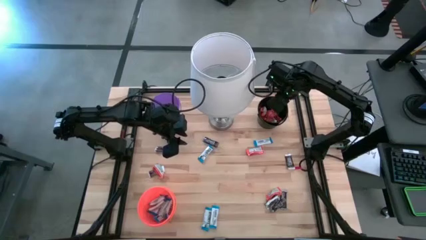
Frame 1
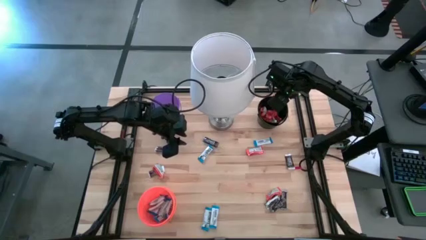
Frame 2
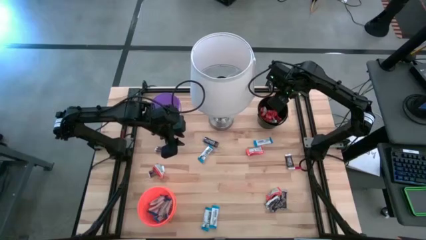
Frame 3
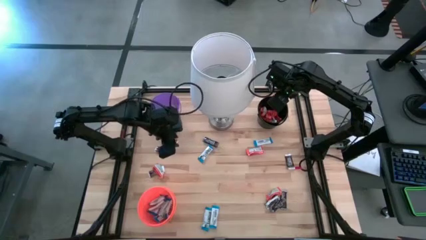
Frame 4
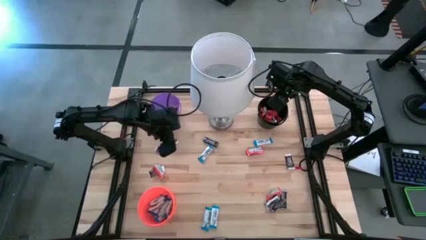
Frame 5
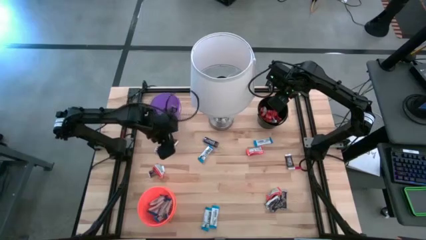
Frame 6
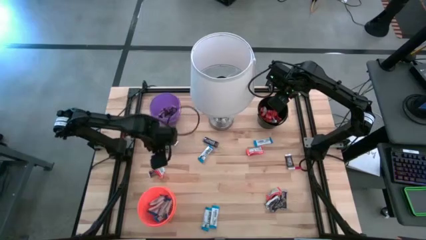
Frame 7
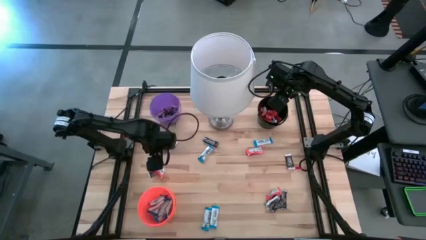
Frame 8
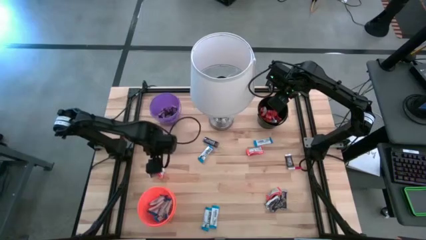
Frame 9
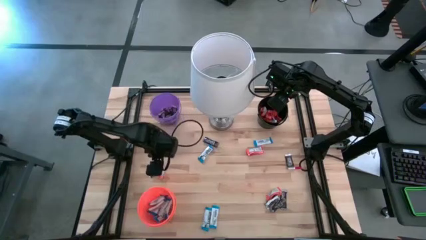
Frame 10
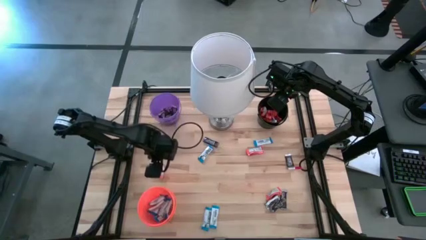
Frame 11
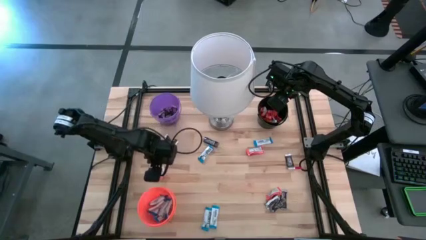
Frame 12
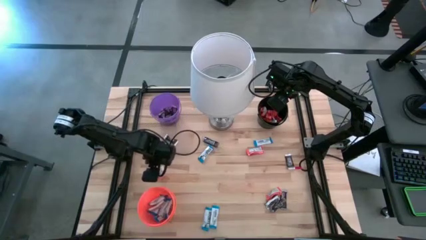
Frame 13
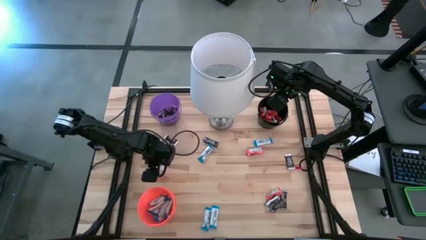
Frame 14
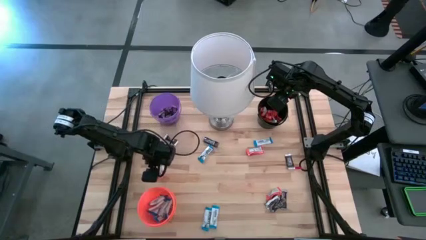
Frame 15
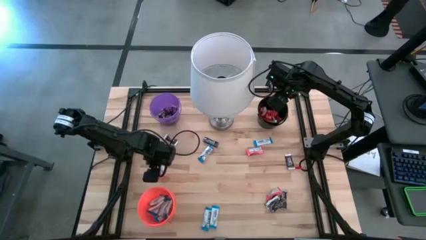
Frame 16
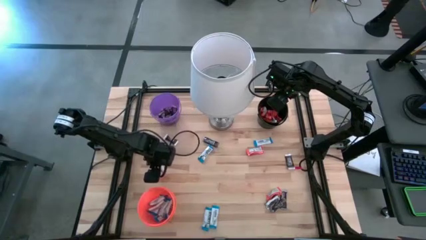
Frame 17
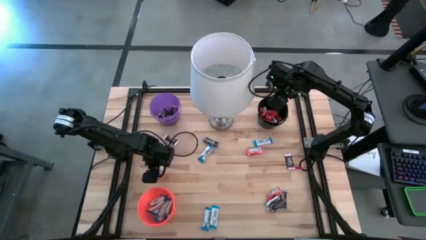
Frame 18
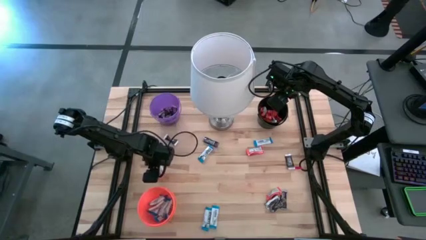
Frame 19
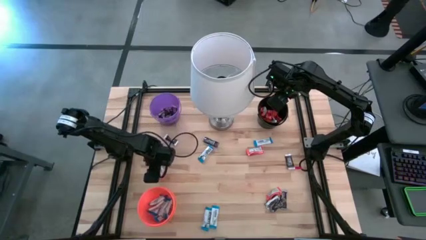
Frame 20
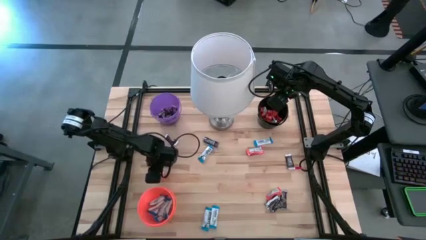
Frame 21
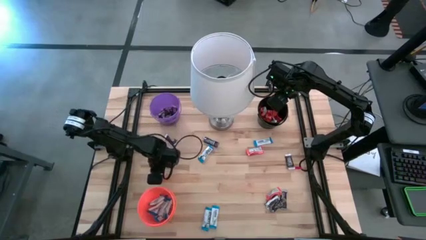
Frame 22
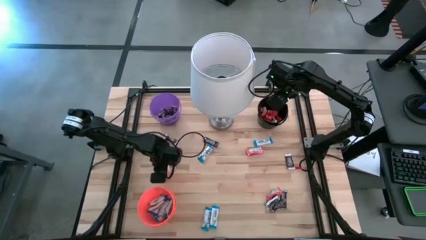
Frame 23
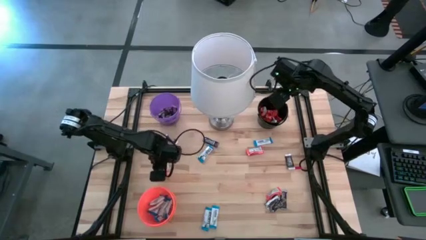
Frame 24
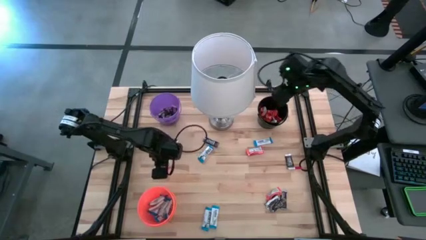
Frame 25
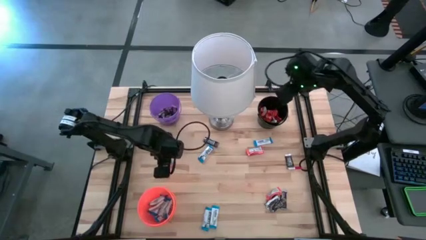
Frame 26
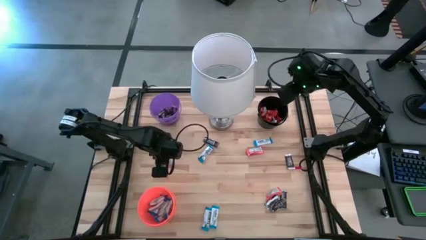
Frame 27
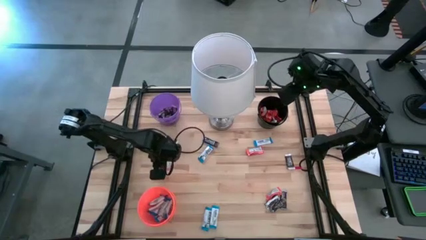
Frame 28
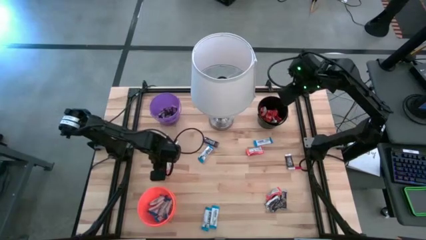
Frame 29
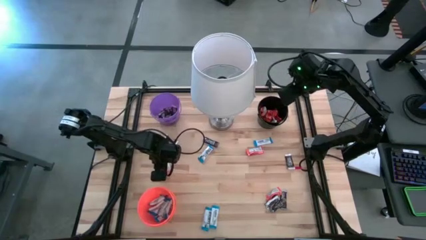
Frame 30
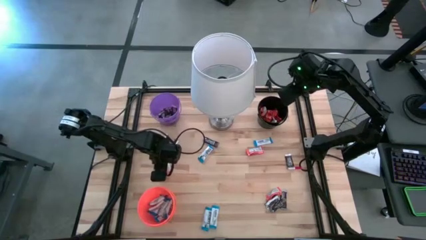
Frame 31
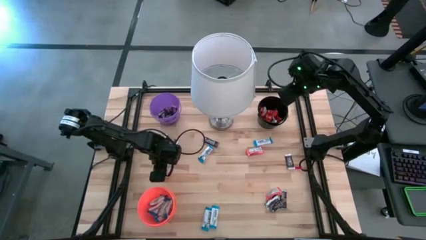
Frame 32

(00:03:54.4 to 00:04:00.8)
Task: Organize candy in baskets
Put the orange chocolate bar into the black bucket

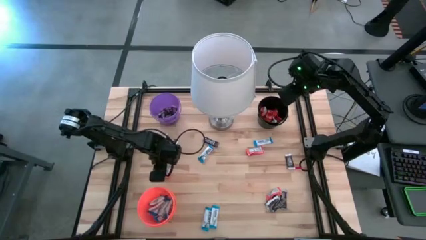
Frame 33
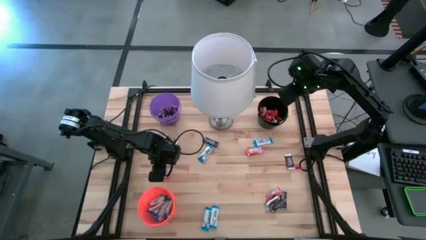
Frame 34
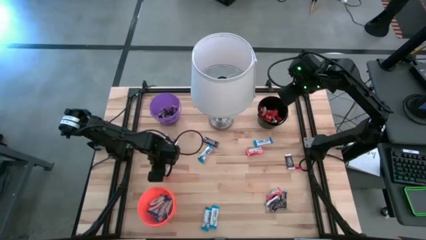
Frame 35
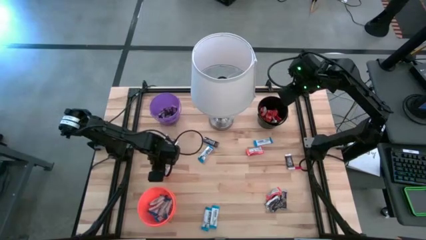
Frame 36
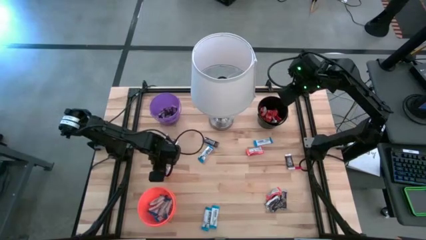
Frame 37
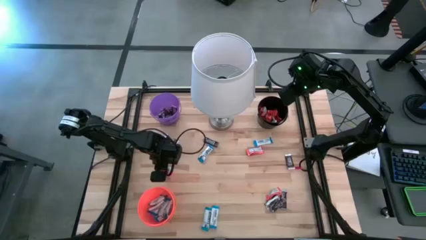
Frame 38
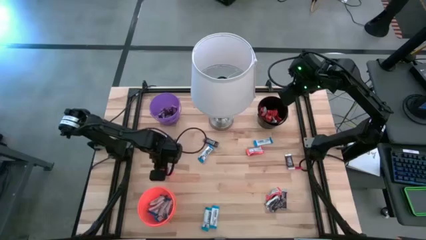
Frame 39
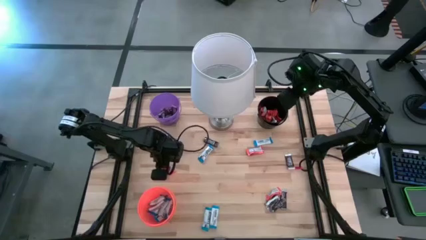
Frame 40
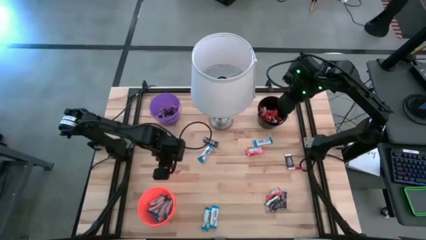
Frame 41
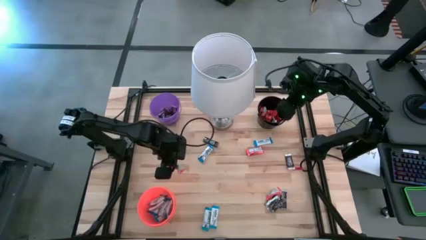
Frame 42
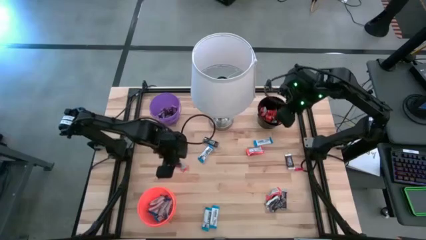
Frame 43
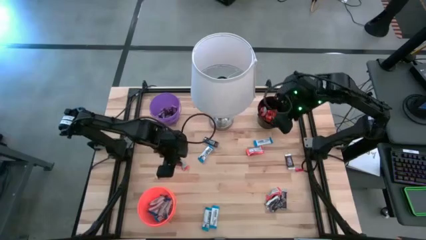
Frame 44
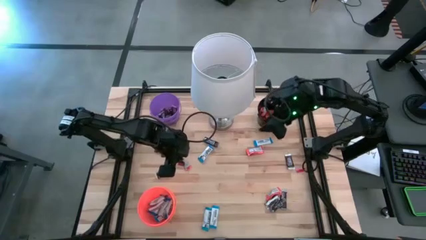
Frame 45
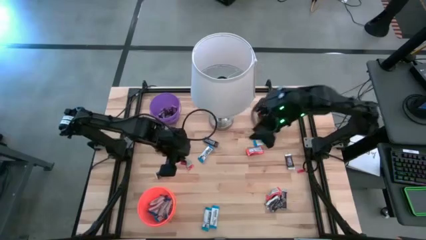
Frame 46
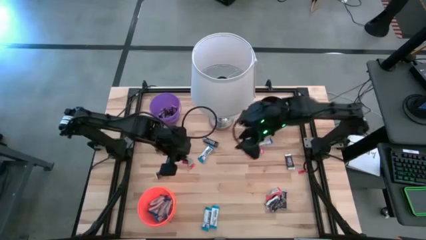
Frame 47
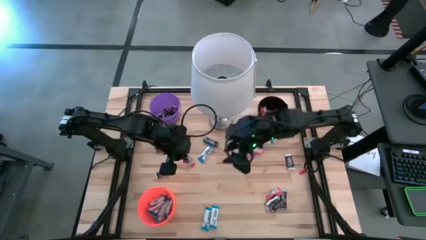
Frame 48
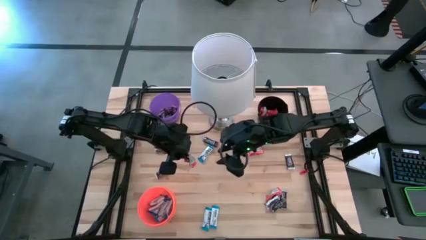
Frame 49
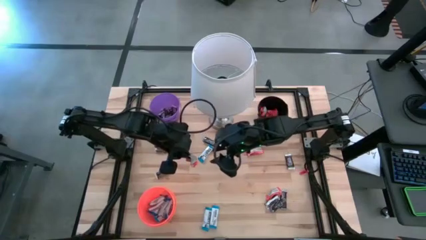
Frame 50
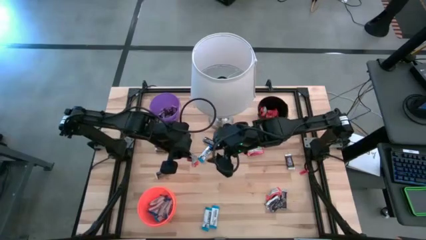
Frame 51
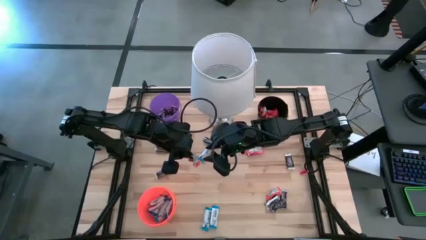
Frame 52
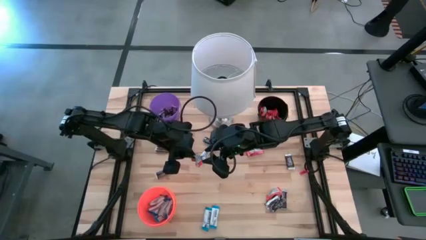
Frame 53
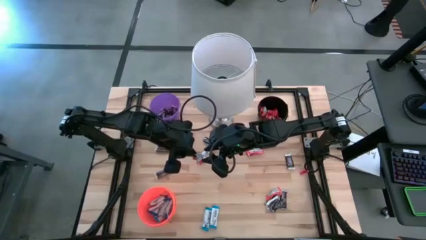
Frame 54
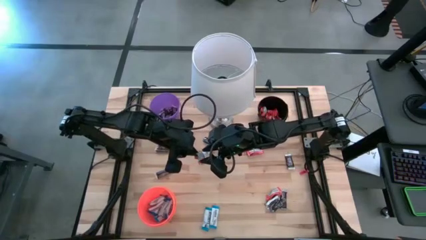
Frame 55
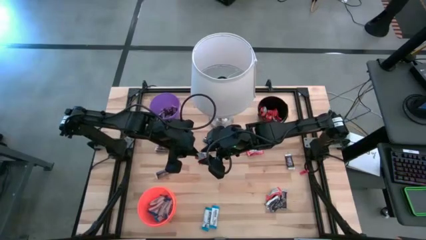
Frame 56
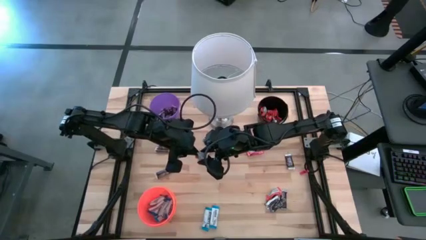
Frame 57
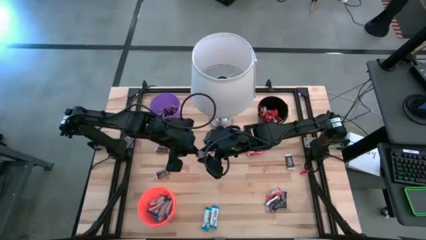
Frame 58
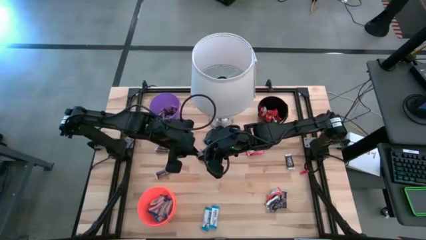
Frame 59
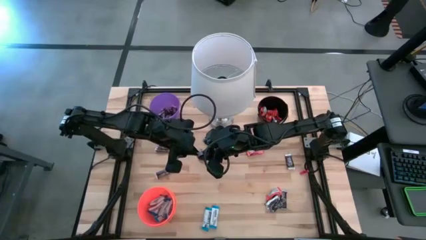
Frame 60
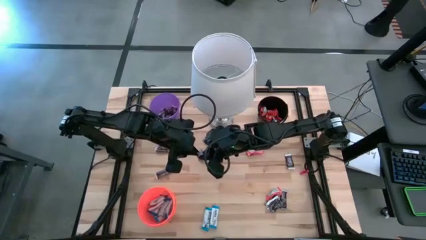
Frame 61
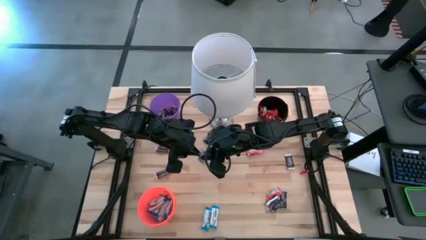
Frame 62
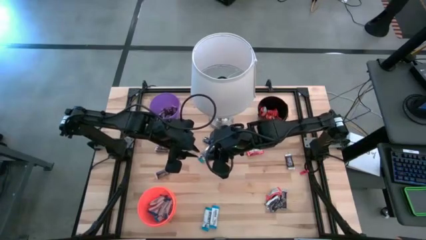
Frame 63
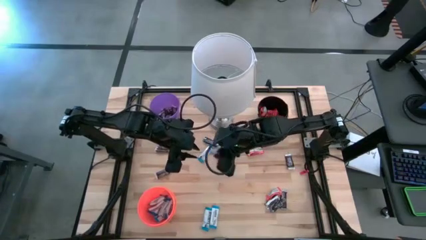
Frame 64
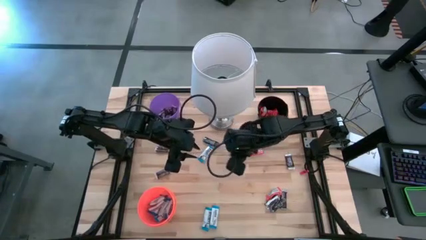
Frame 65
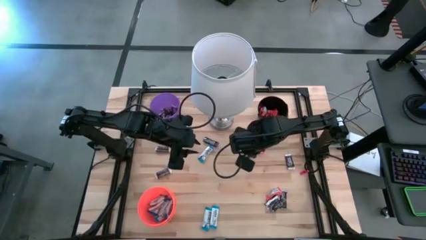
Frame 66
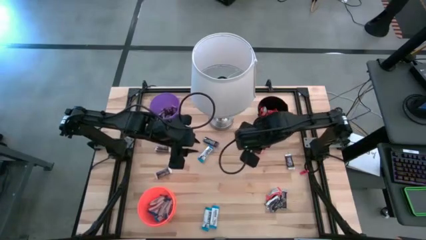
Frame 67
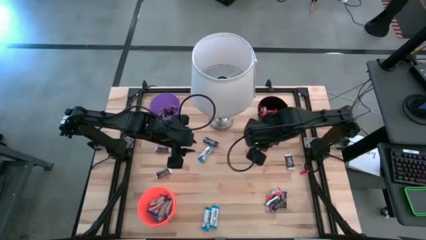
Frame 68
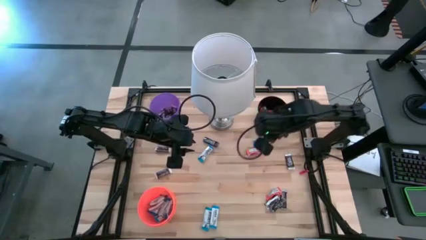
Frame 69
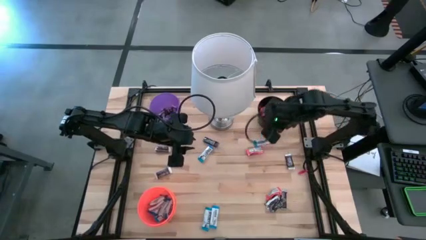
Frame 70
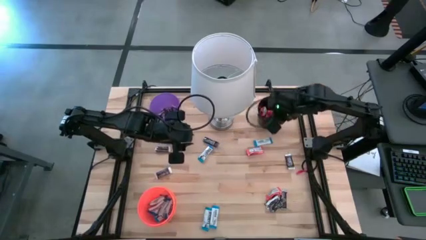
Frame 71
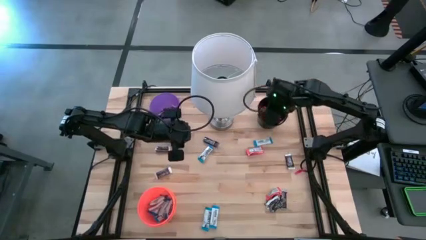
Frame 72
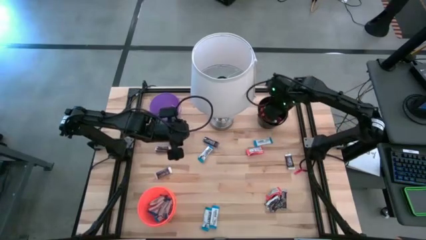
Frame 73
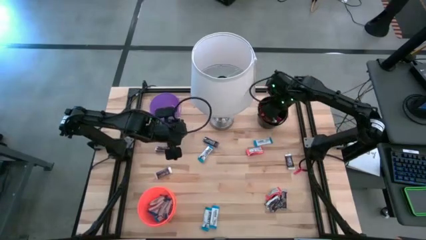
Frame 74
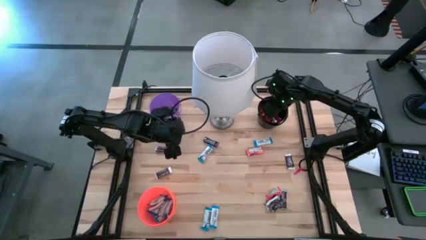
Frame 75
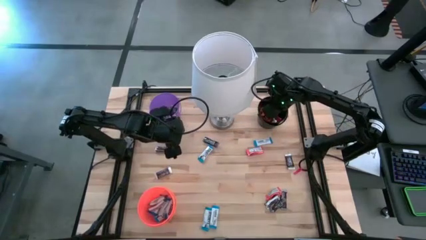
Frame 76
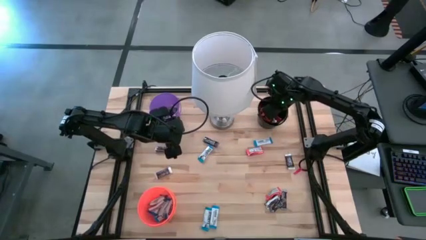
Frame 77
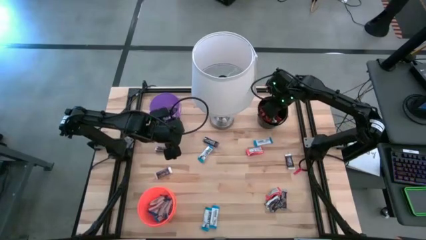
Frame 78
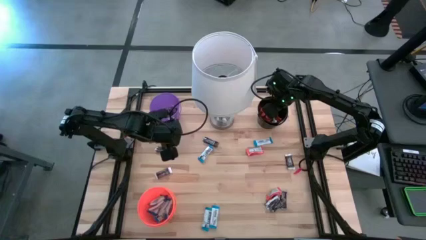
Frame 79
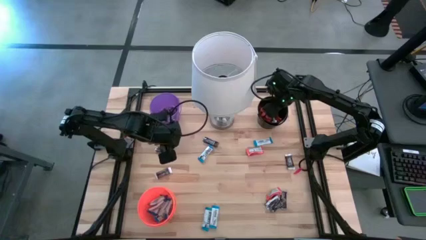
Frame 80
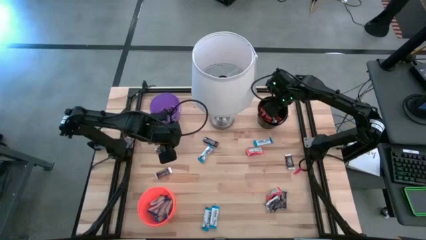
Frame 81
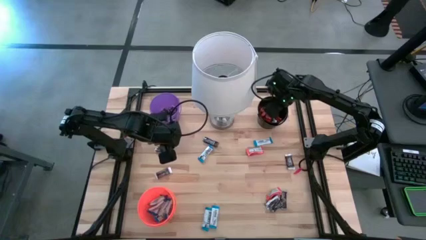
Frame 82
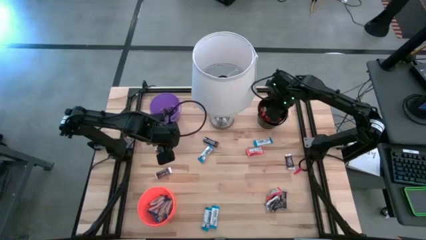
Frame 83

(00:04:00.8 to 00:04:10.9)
Put the orange chocolate bar into the black bucket
